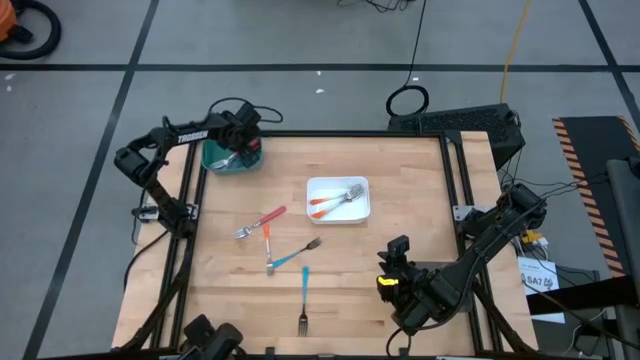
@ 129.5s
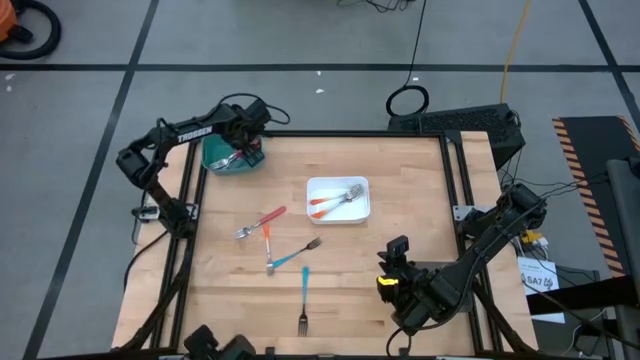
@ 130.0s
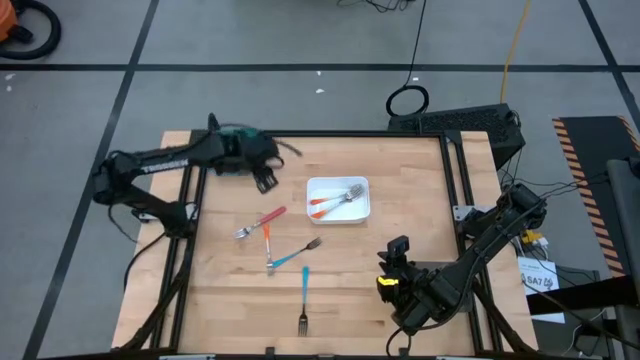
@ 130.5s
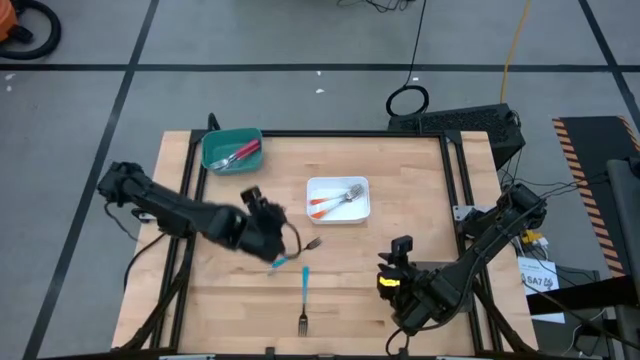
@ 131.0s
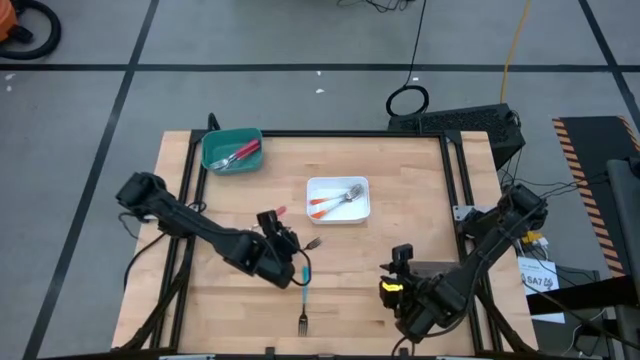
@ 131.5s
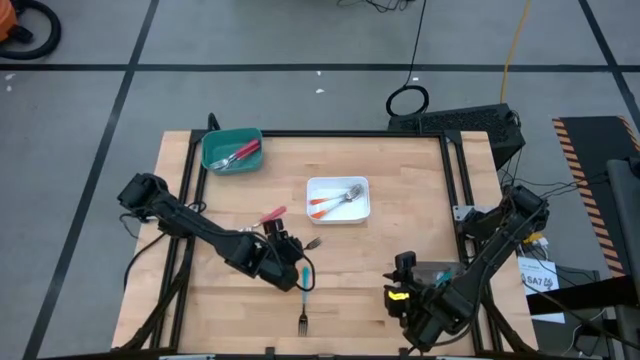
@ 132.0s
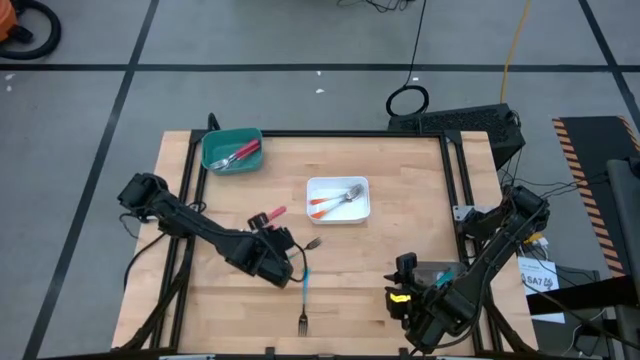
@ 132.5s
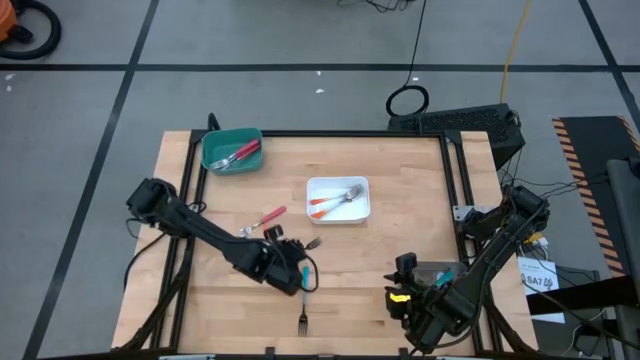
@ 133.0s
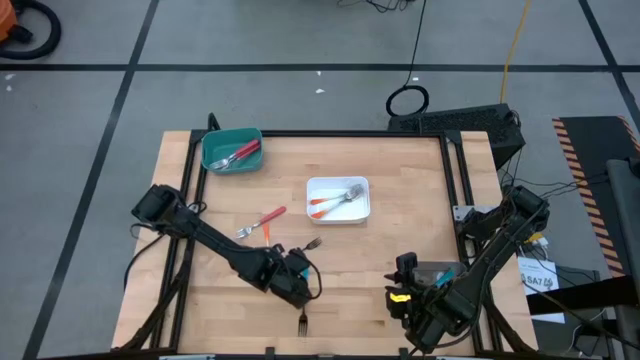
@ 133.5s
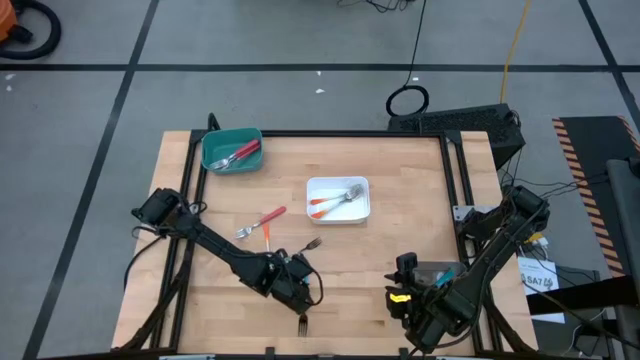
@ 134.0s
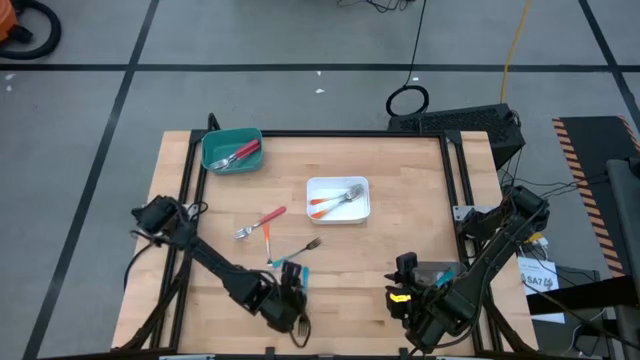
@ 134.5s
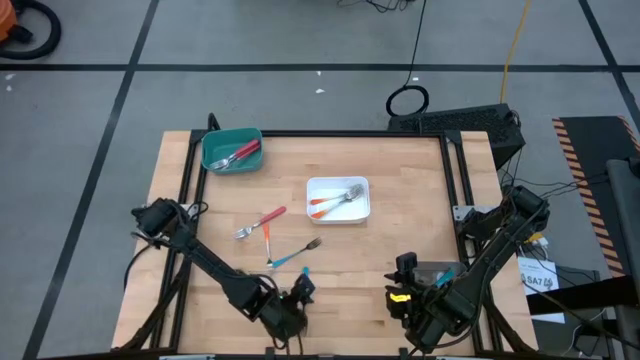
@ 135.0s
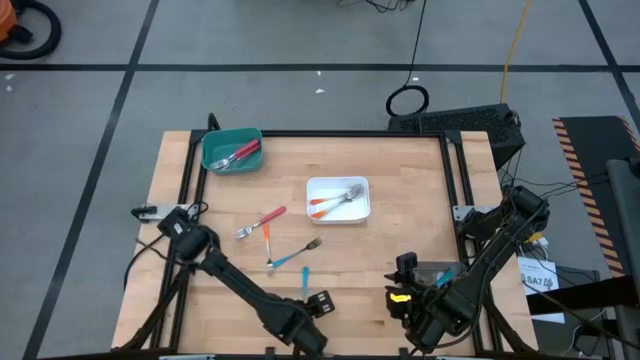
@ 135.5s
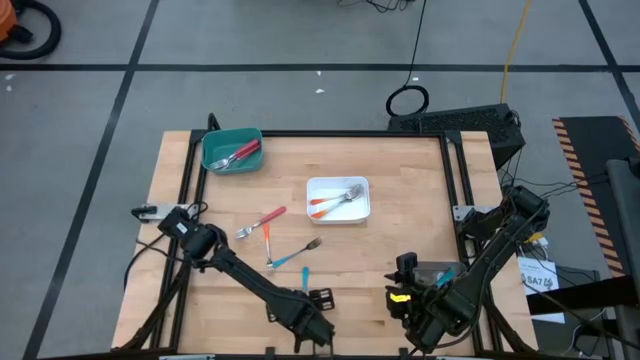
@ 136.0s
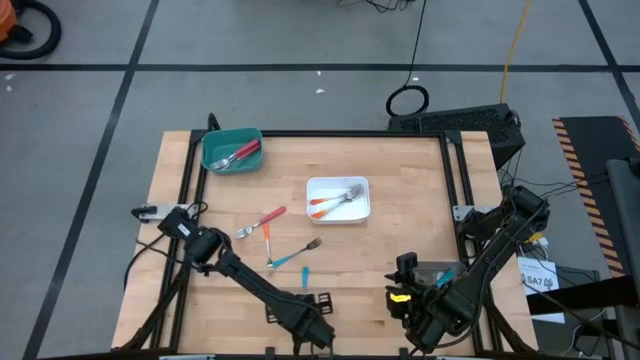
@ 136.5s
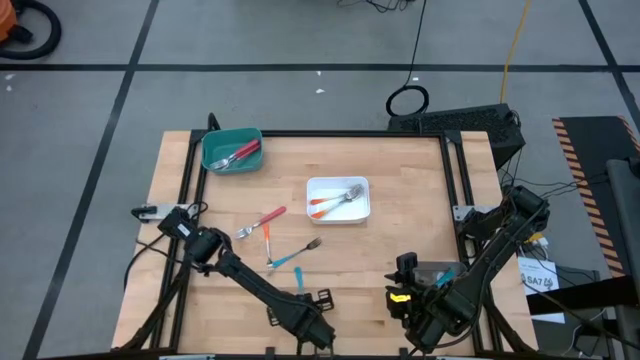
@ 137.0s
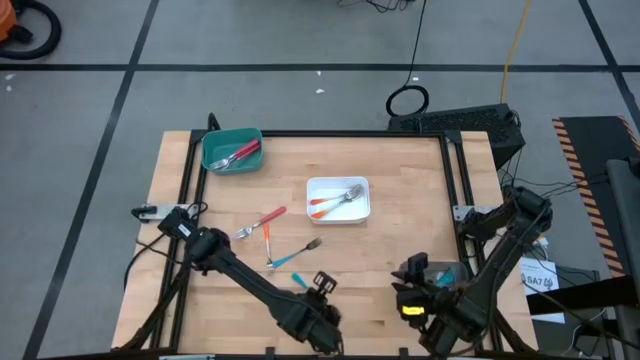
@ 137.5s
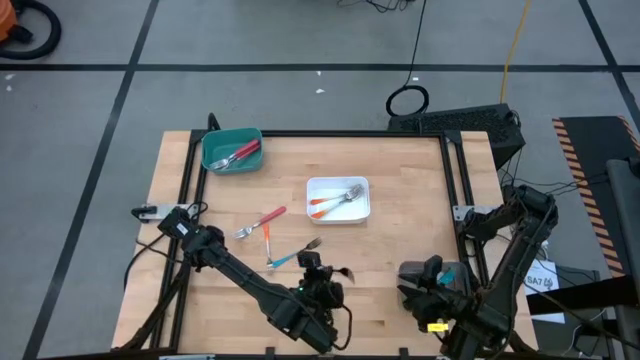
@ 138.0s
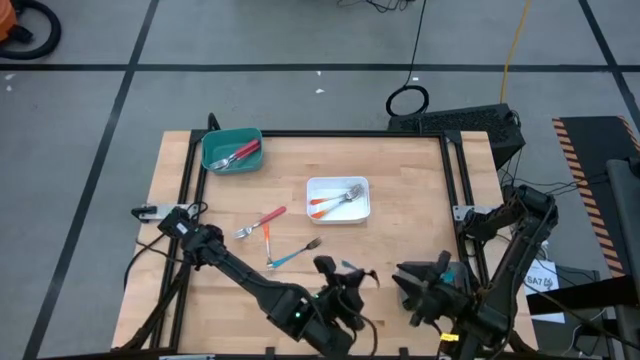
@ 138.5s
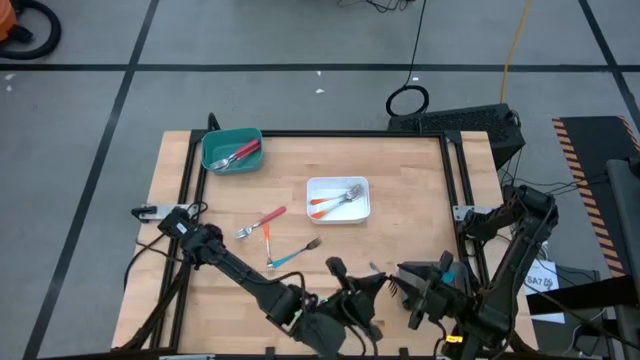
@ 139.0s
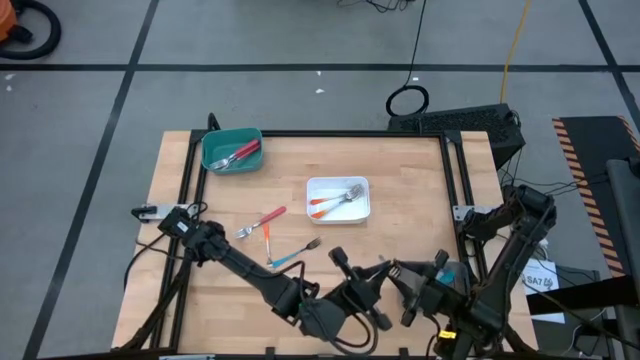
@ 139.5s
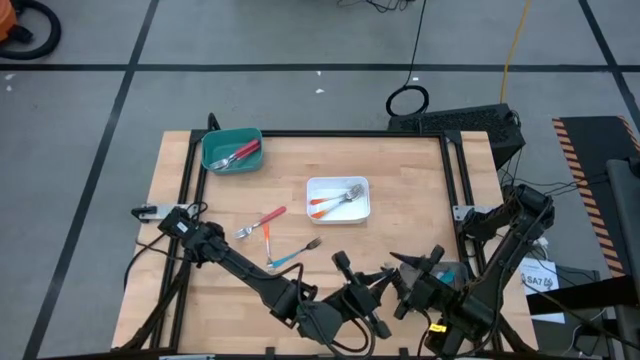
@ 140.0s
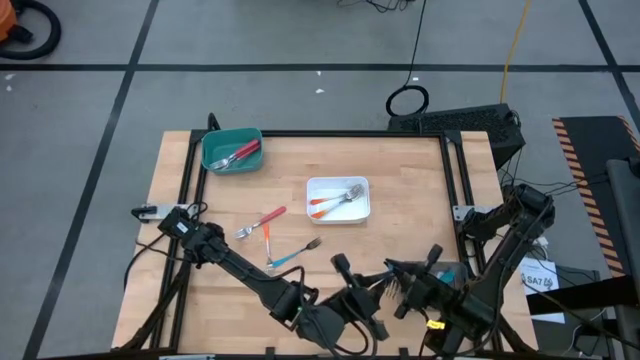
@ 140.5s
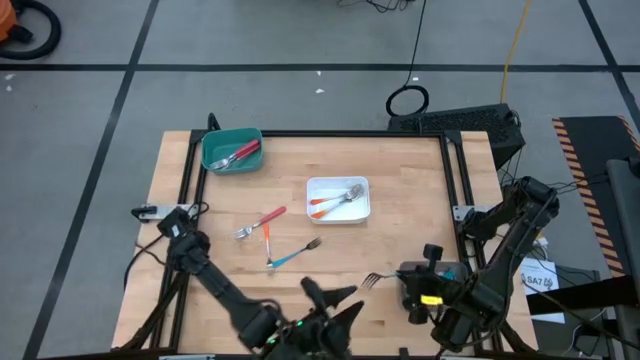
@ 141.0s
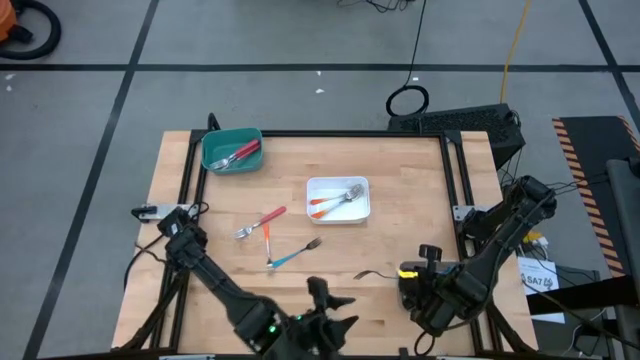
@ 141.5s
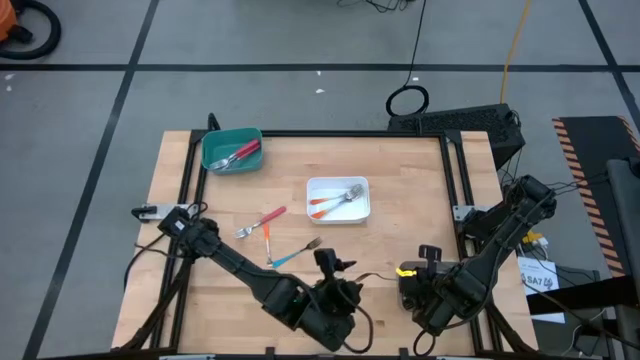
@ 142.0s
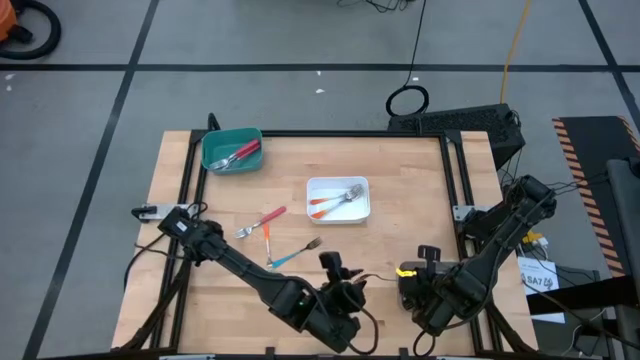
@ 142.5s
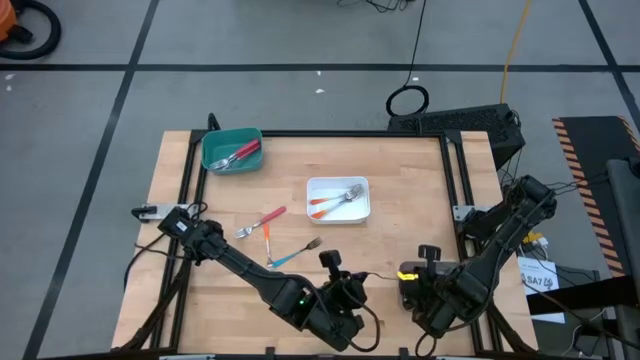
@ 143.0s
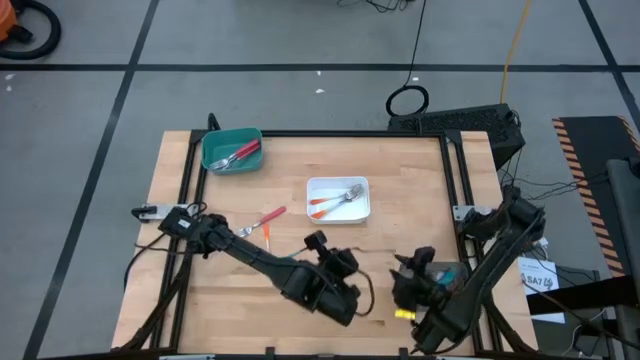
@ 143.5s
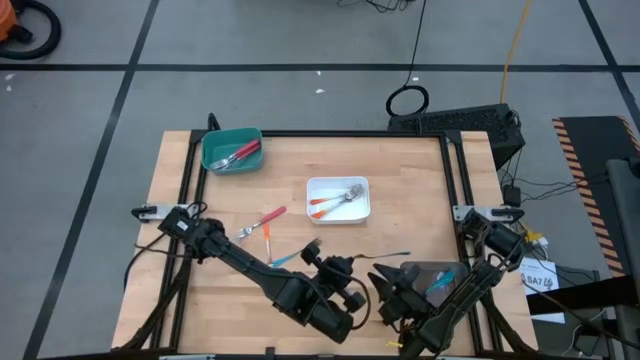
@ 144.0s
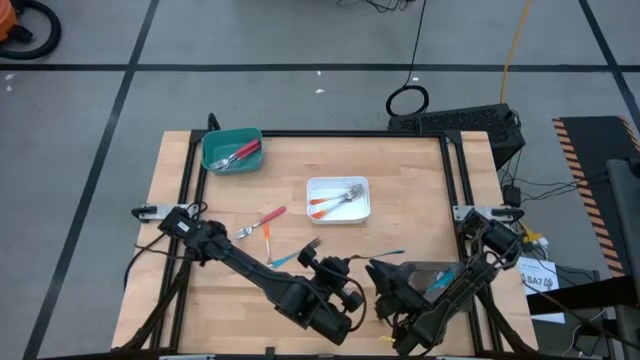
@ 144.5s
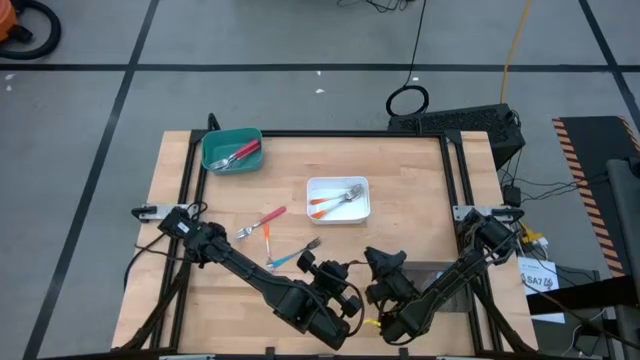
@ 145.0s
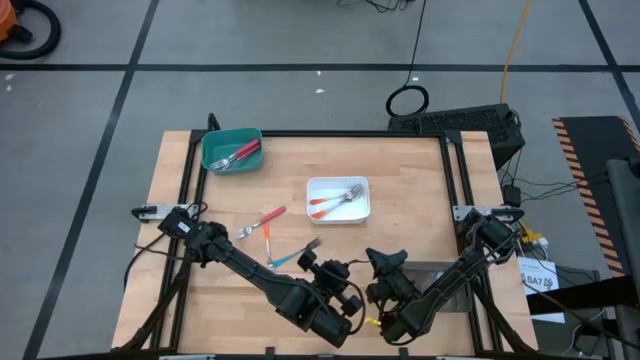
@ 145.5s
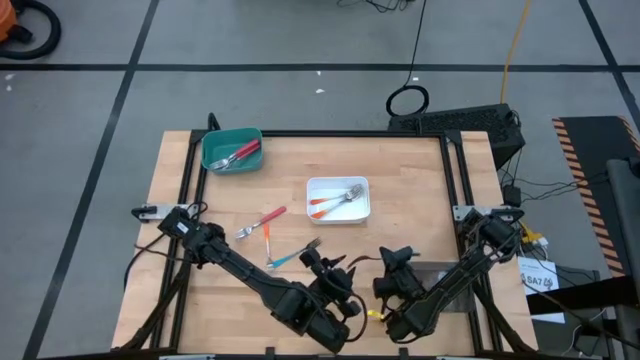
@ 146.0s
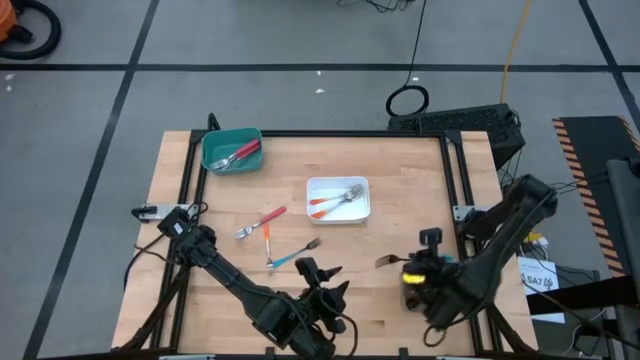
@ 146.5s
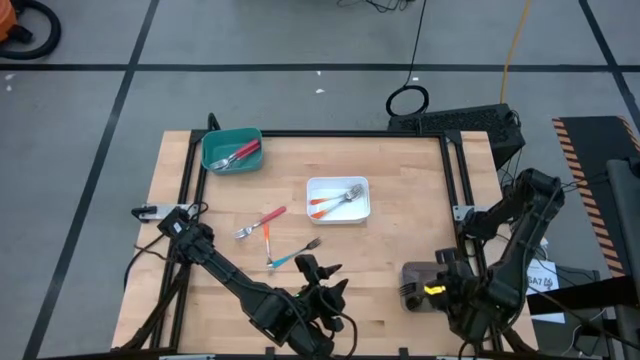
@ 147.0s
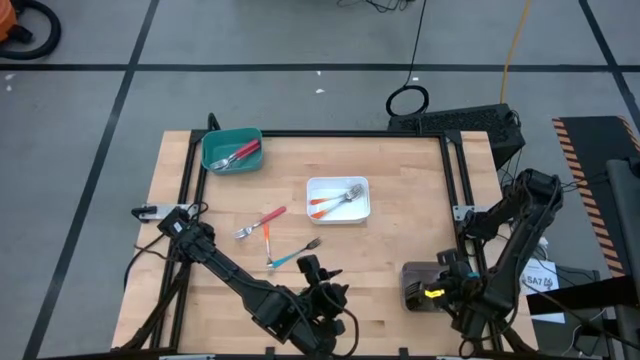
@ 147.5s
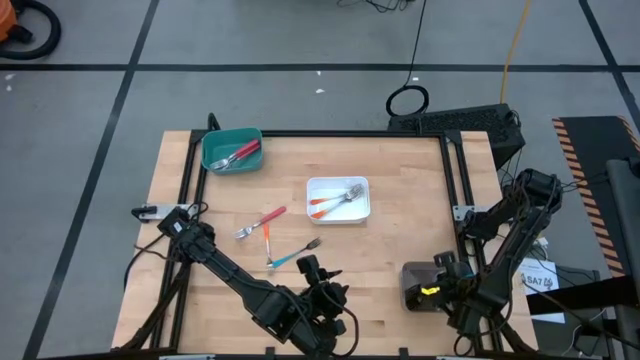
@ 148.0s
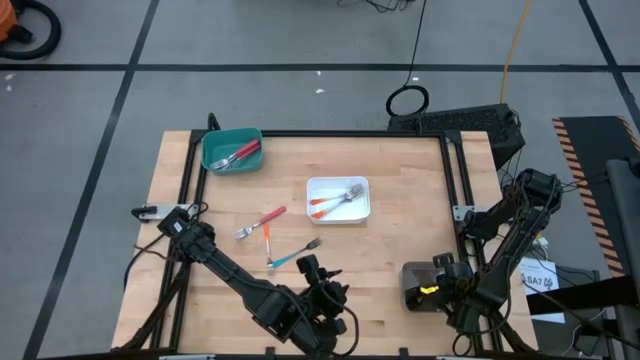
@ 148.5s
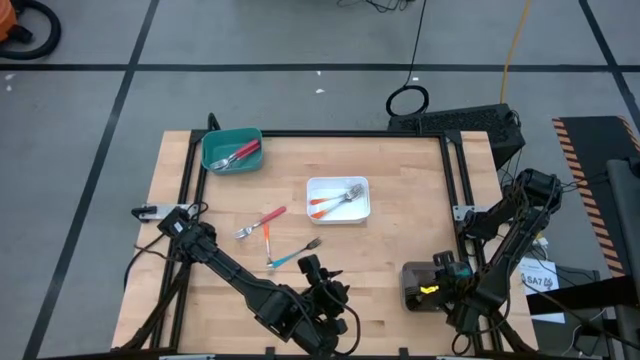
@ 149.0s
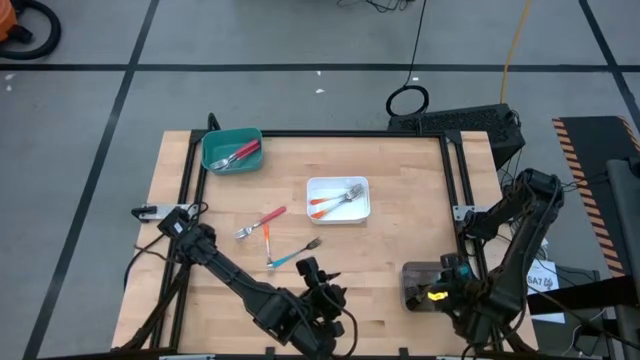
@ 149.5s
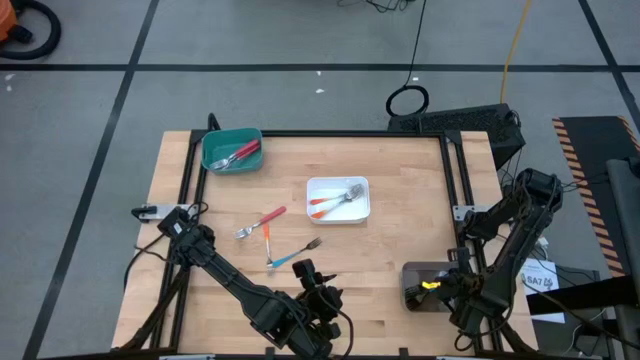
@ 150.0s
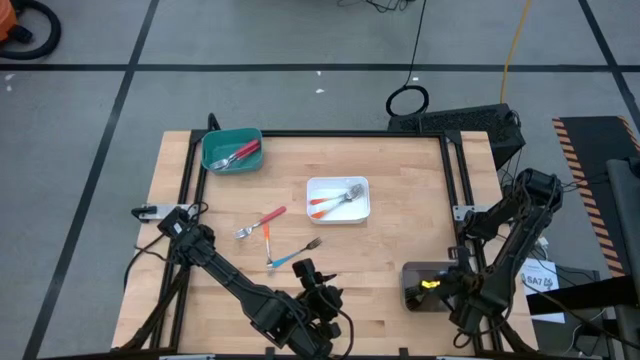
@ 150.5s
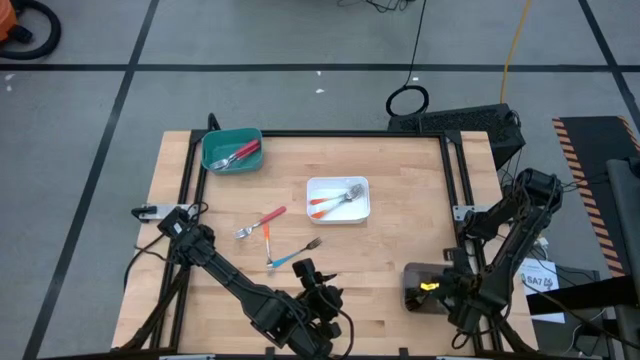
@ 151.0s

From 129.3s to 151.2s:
Task: Sort silverware by color (type)
Put the blue fork into the black bin
